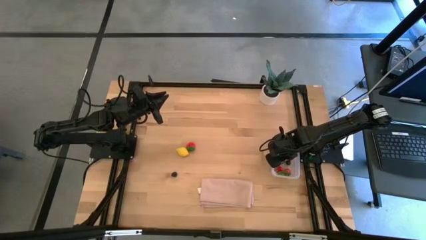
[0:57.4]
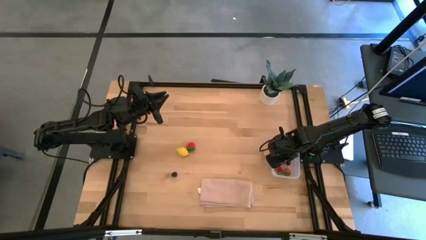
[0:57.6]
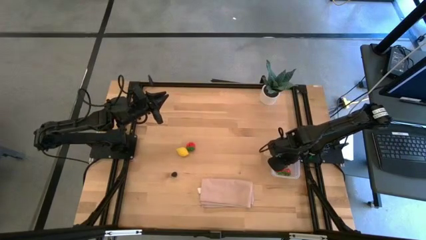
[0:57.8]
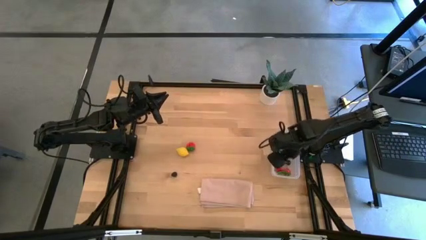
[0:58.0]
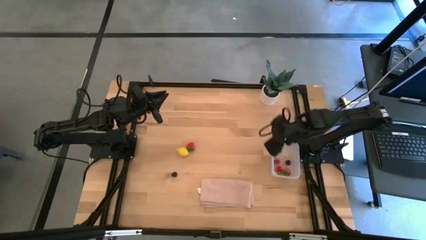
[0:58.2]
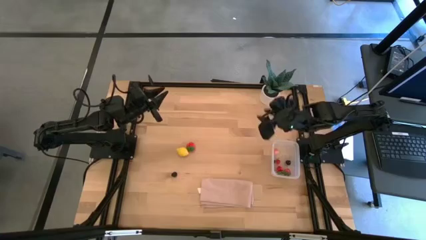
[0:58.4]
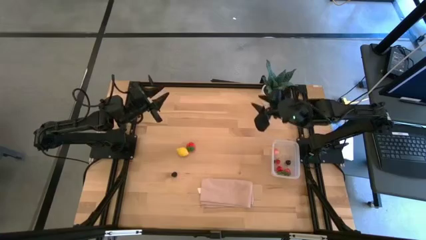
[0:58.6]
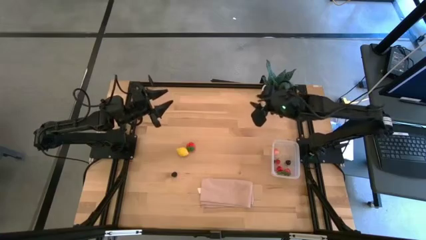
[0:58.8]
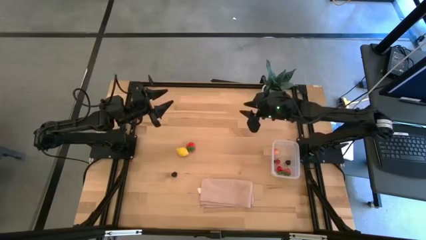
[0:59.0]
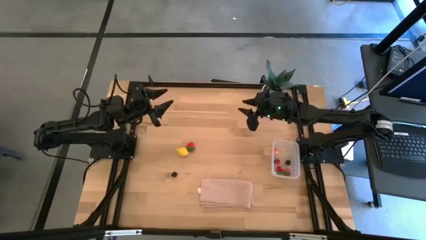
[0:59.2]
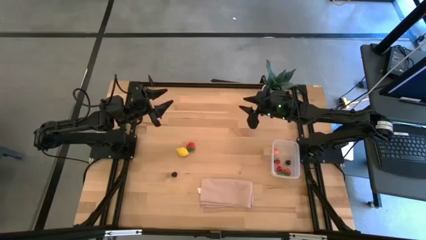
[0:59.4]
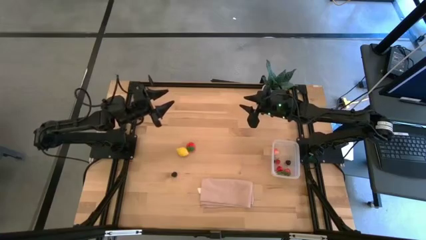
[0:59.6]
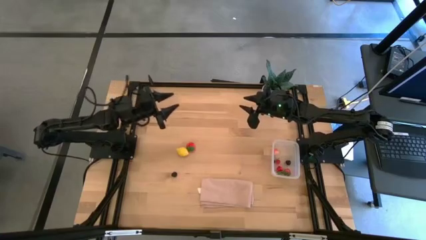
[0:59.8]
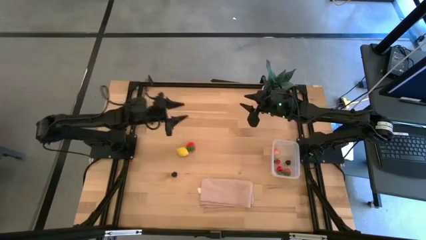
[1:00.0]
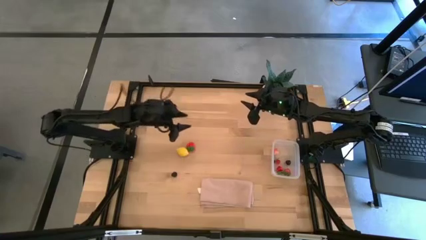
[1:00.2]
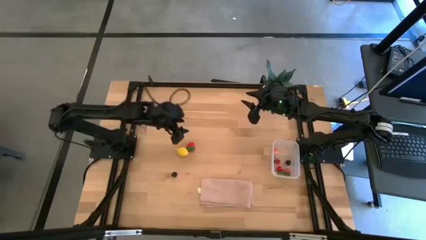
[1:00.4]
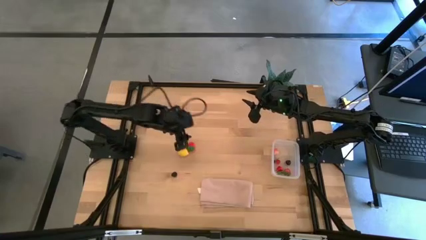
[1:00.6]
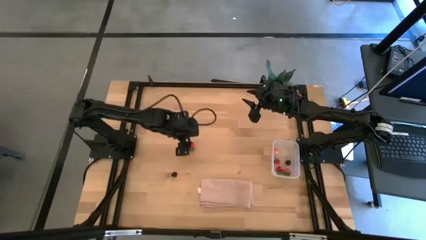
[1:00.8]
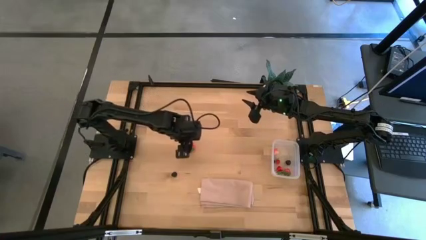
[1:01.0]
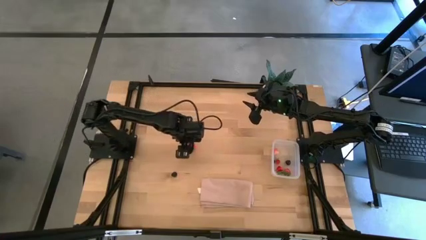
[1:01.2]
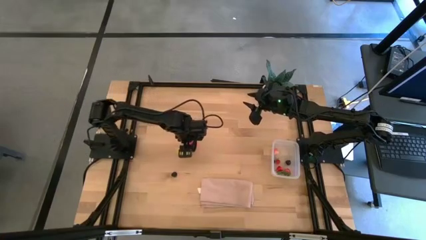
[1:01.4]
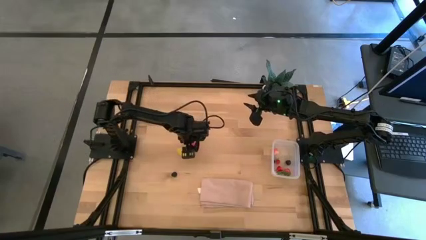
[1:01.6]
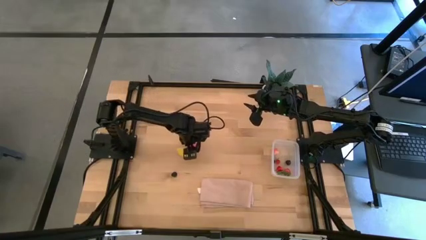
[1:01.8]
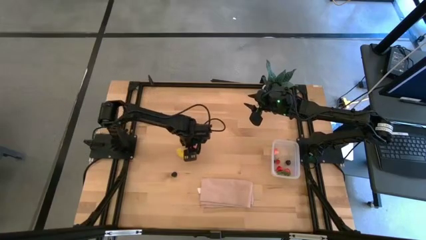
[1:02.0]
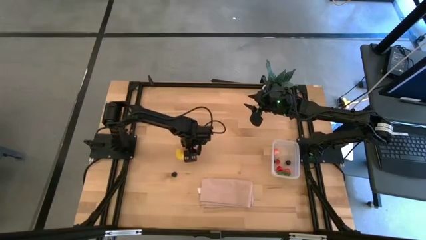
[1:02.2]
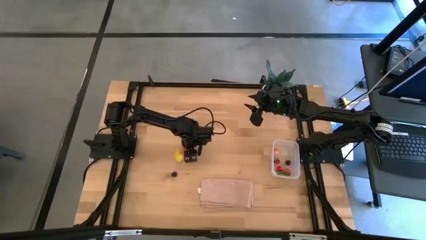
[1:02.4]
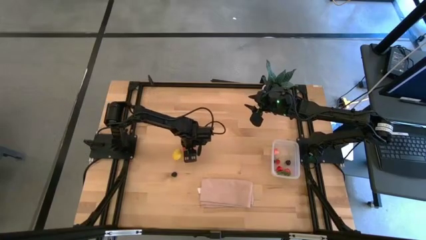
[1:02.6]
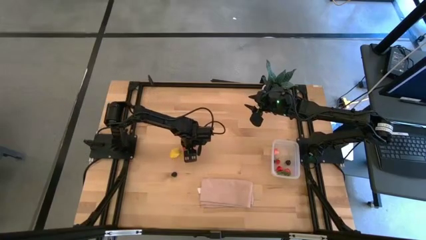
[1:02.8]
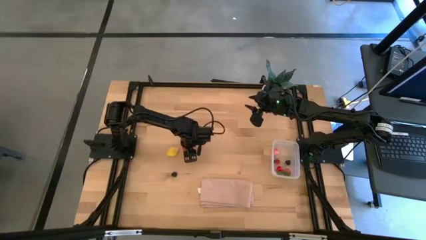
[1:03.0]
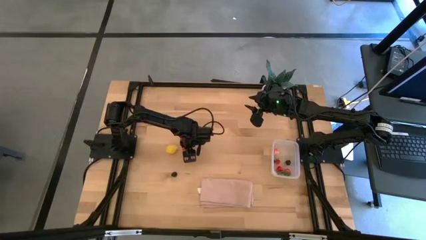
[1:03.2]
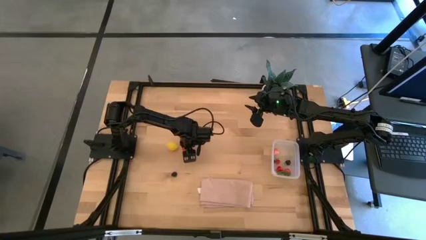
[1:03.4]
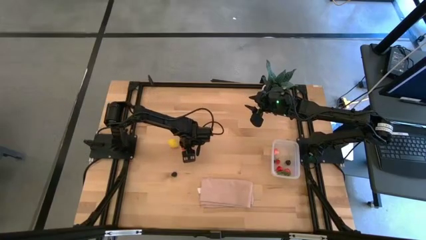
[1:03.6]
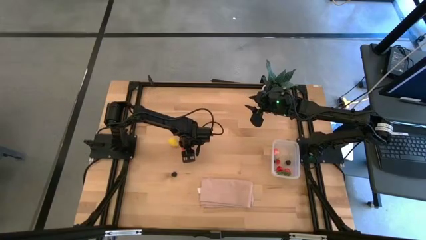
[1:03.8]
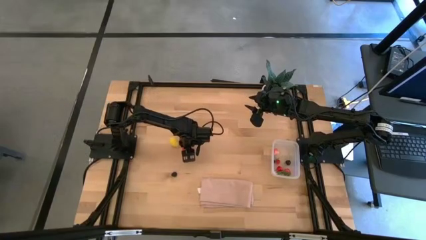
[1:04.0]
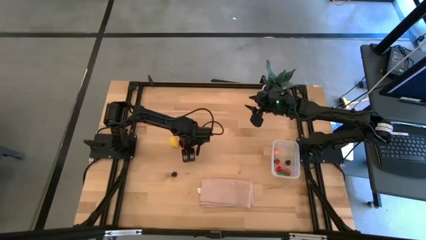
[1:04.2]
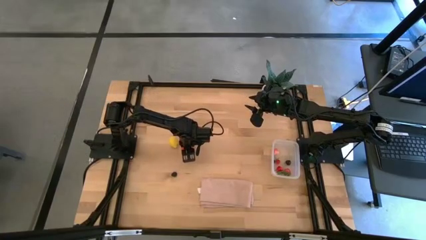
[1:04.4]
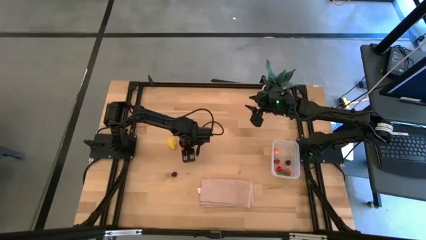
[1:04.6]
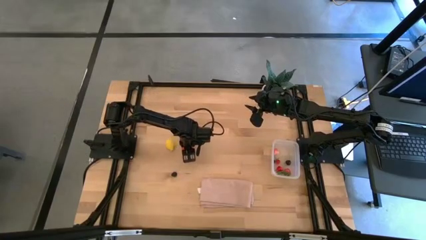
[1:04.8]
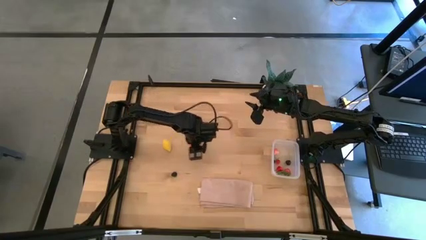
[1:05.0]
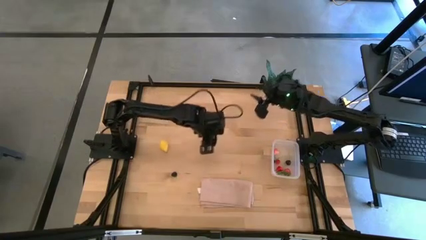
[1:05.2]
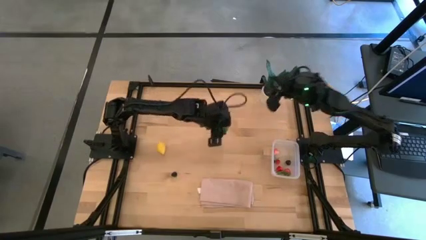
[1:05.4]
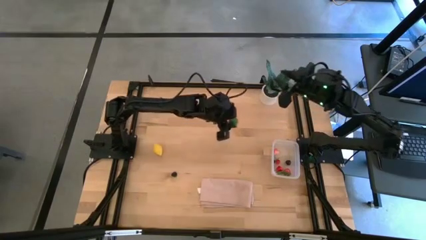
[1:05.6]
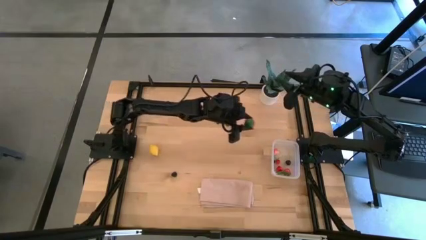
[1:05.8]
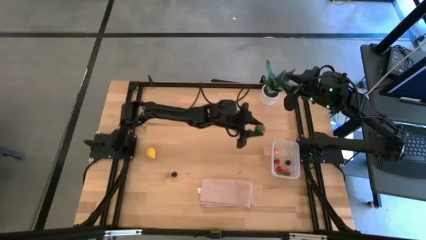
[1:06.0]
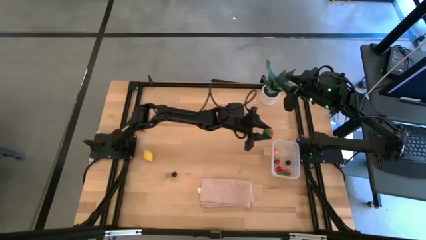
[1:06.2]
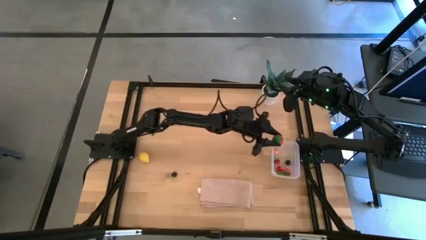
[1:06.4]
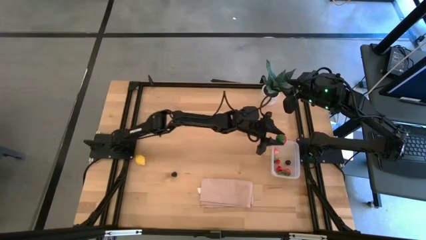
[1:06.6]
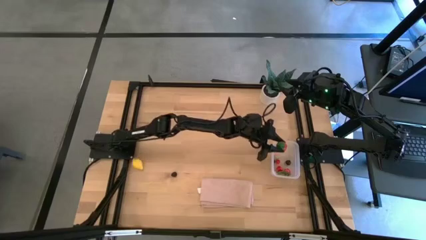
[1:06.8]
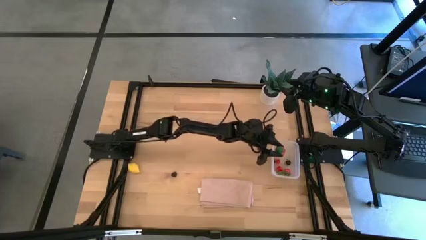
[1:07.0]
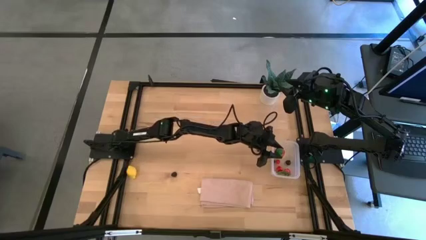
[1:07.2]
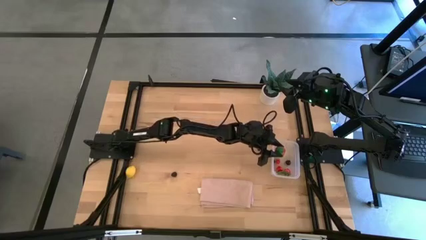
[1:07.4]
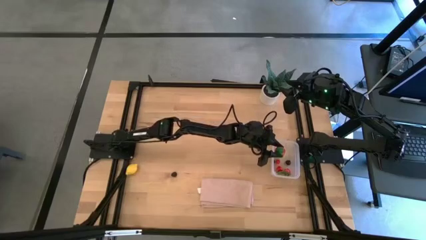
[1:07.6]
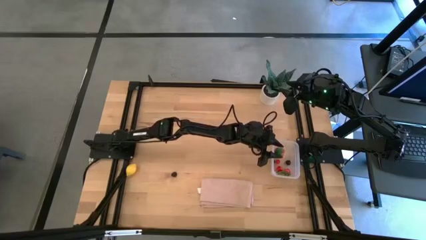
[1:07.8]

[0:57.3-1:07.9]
Task: Pick and placing Produce into tupperware
Put the red strawberry into the transparent bin

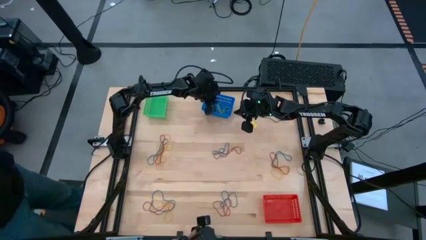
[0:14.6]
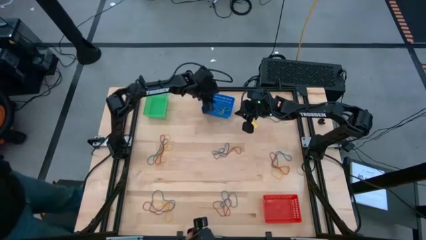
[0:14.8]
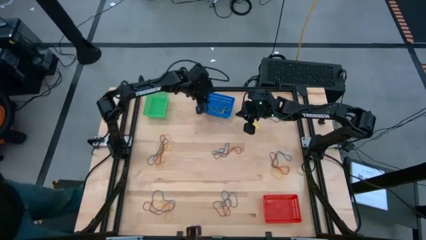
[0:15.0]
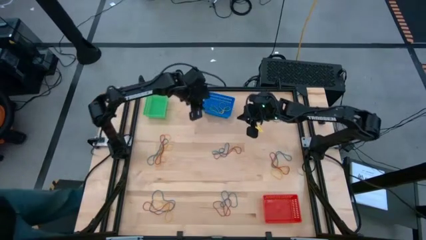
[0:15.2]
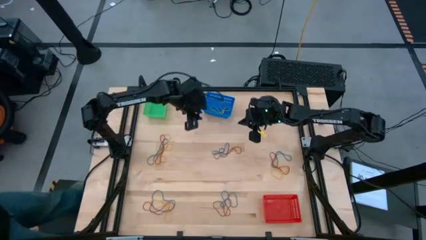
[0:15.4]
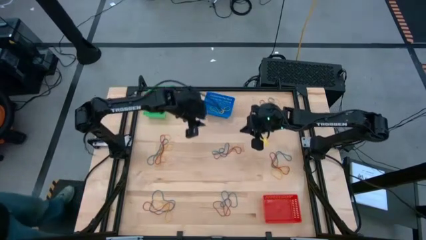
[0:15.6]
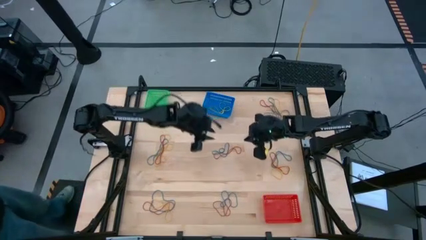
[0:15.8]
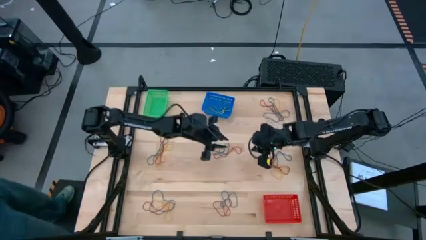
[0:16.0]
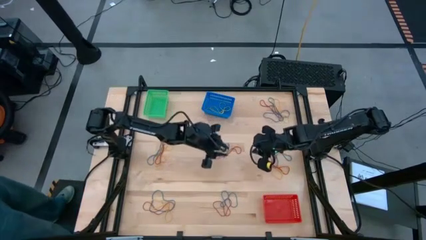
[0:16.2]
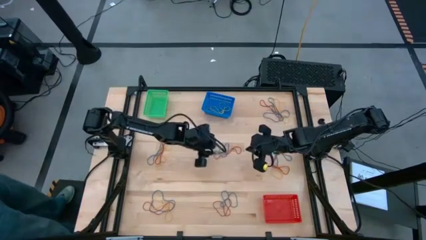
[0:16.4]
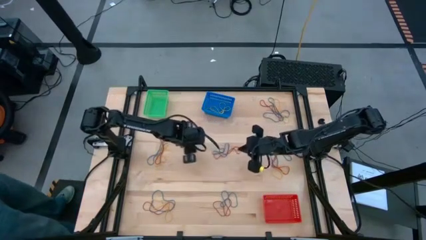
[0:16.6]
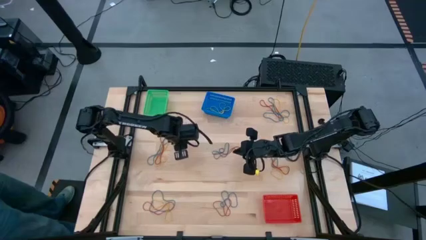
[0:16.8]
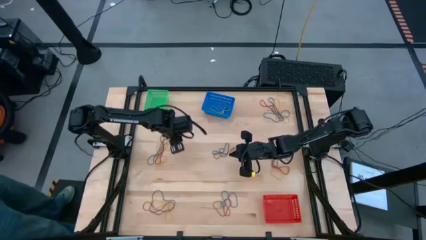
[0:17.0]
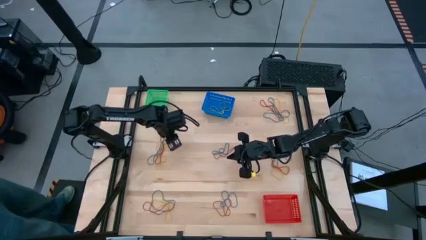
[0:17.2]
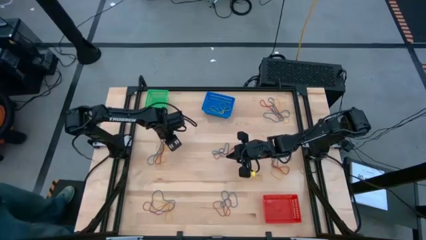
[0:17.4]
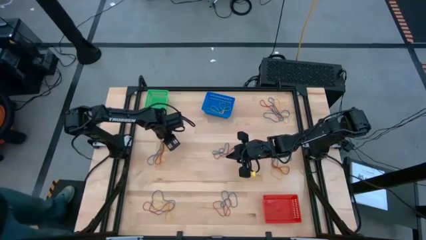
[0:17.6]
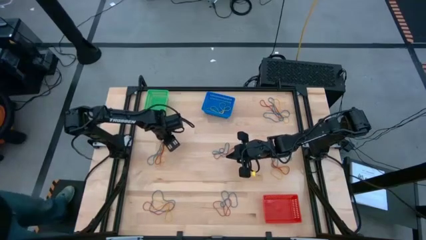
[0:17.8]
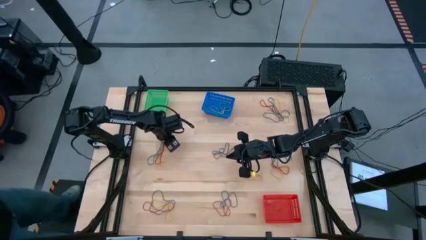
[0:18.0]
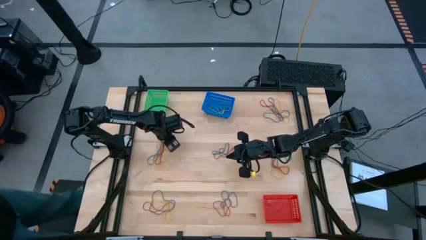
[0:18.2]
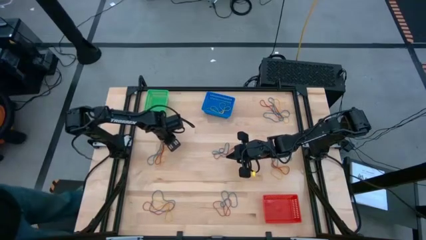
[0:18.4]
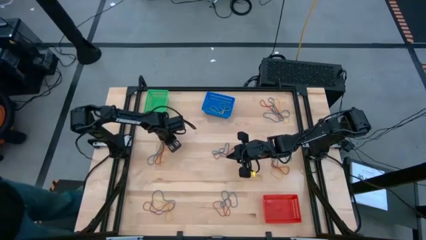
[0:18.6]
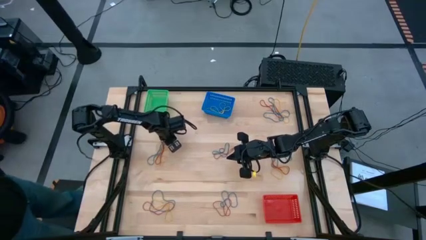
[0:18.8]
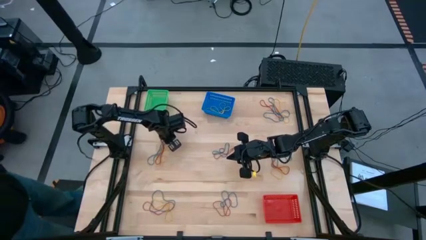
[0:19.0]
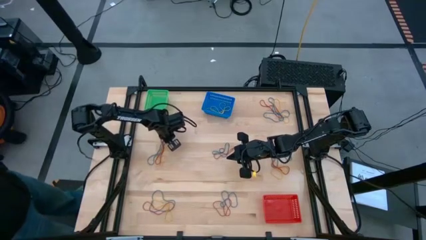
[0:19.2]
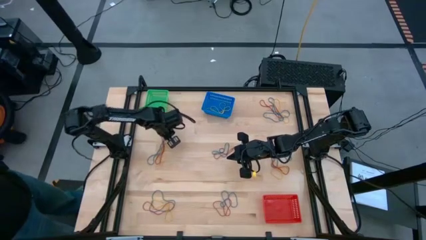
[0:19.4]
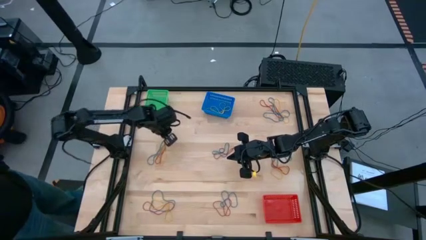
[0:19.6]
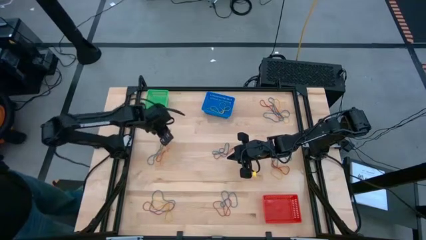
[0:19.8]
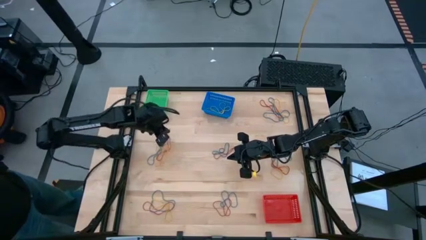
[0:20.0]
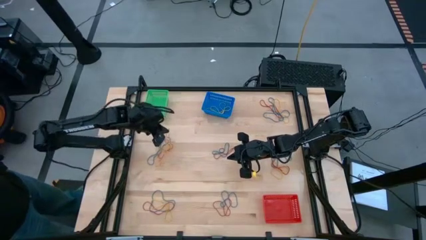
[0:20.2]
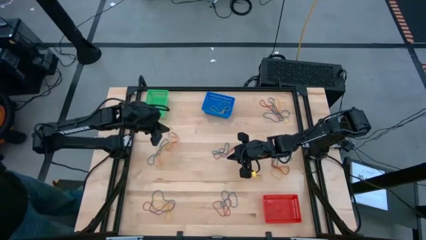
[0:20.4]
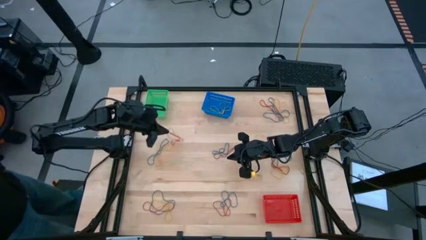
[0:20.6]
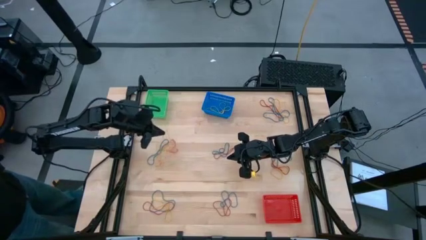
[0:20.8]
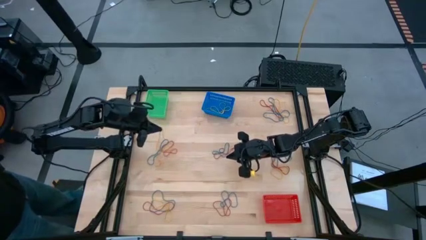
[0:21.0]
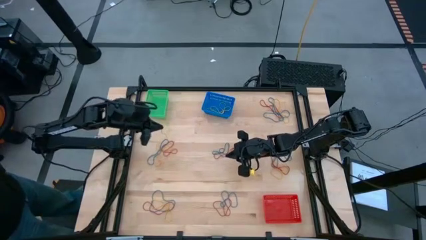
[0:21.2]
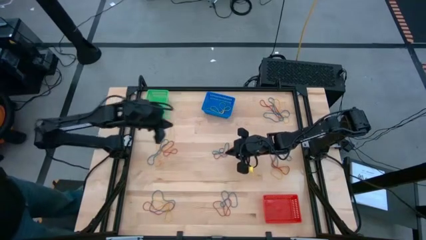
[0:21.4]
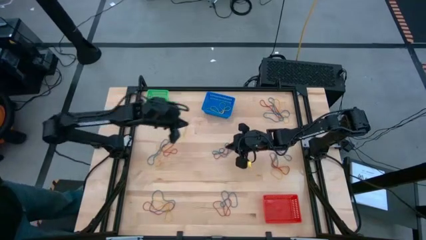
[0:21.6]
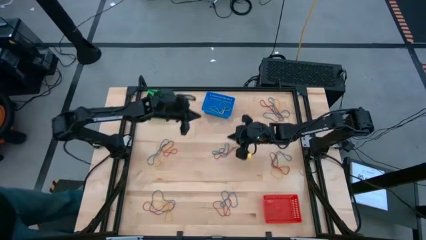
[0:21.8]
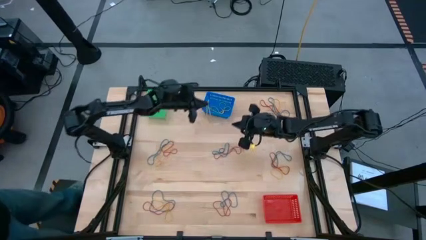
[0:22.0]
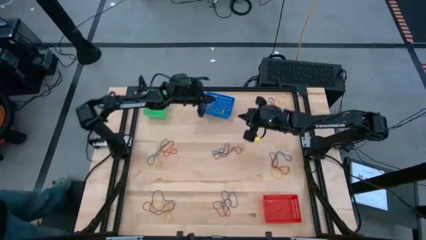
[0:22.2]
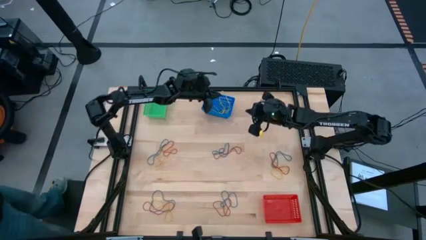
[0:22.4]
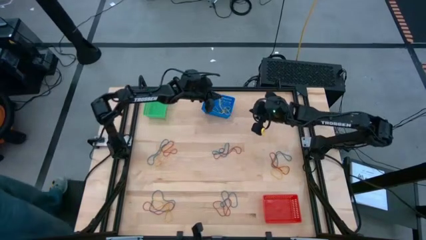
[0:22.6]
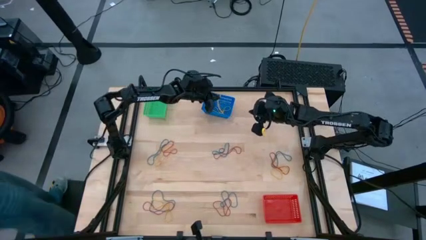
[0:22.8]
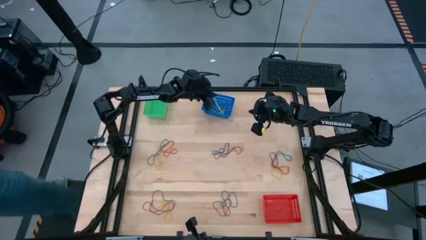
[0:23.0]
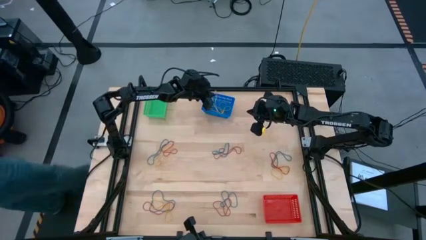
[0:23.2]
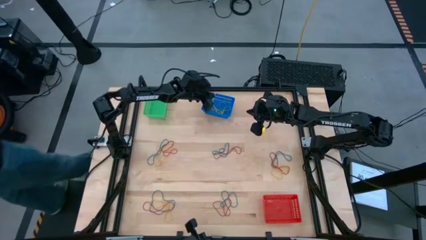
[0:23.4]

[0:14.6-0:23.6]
Task: Sort rubber bands into baskets
Put the yellow rubber band into the blue bin
